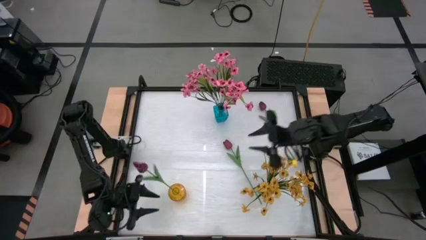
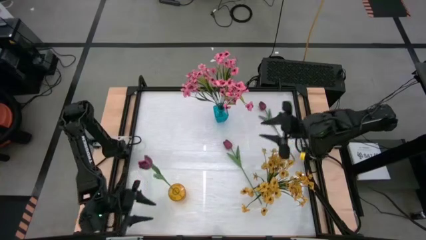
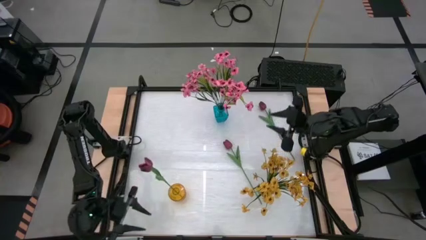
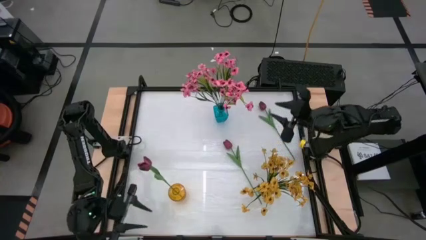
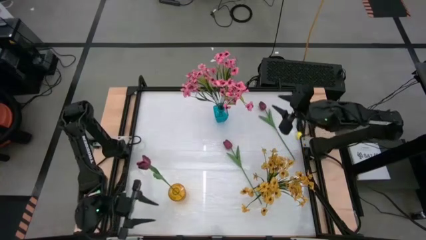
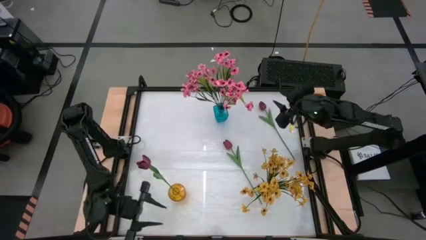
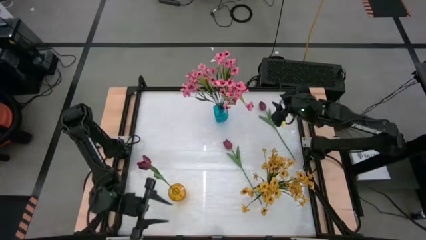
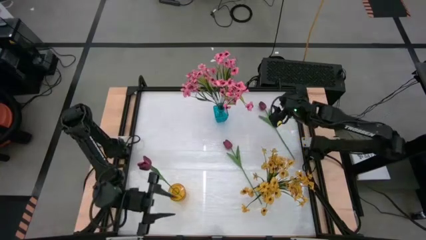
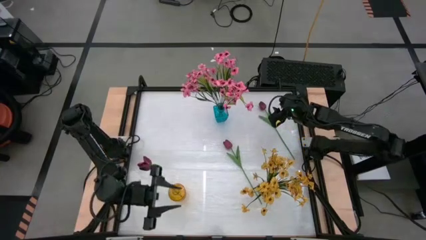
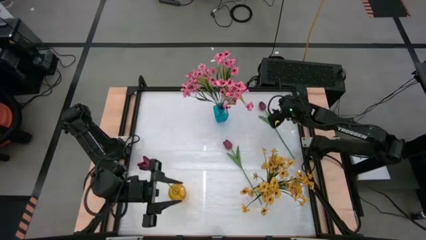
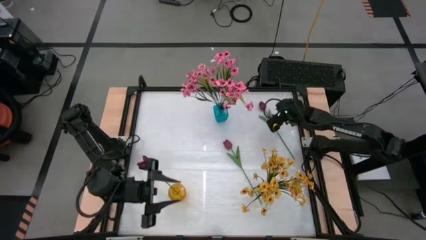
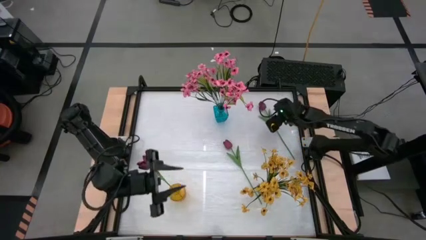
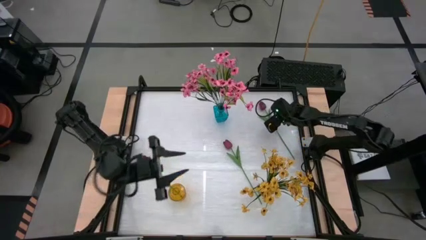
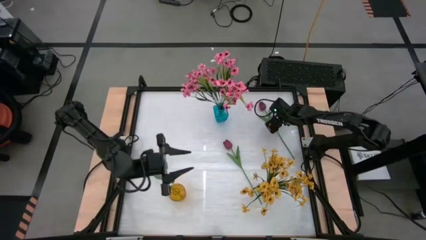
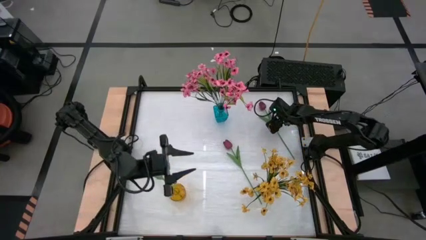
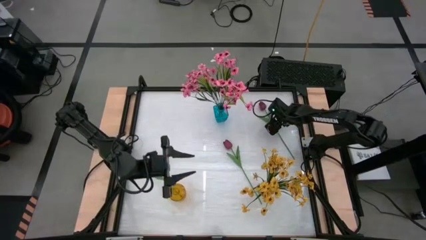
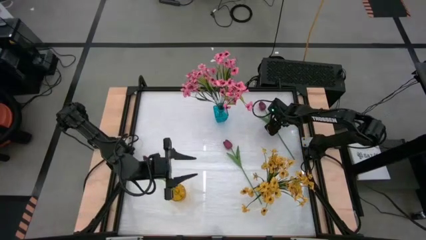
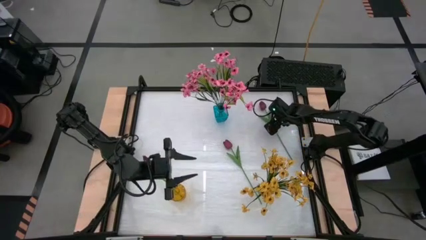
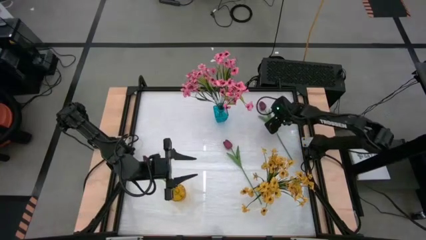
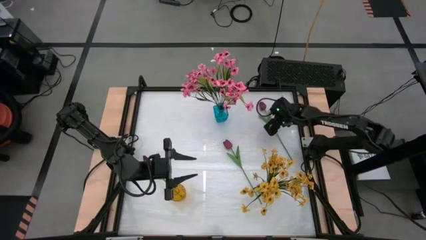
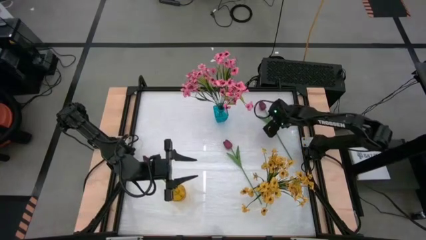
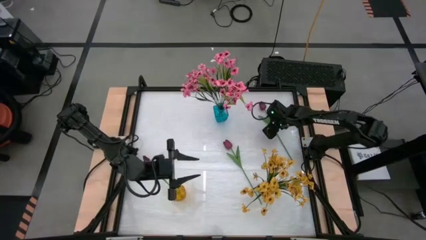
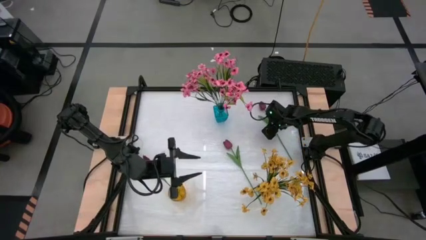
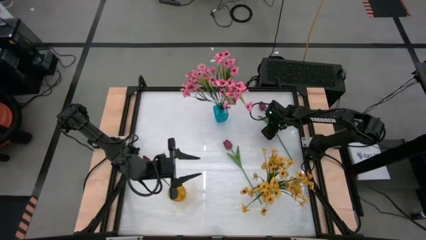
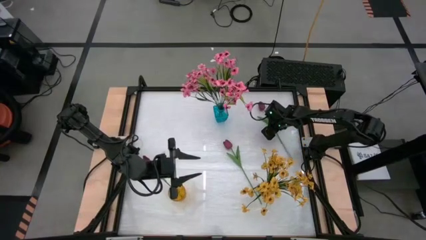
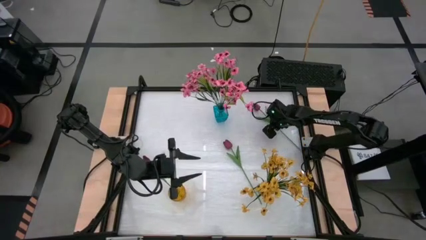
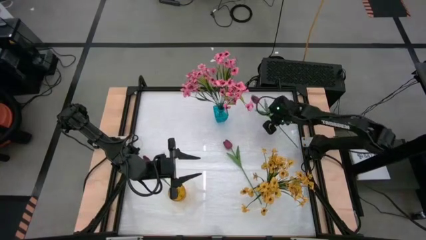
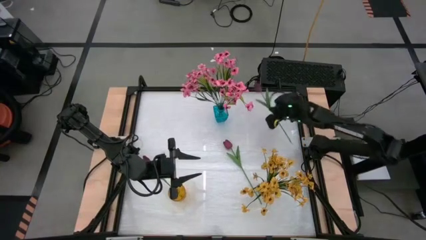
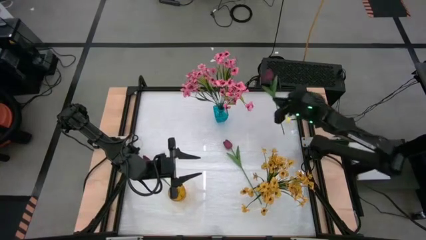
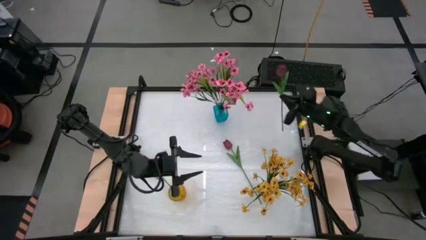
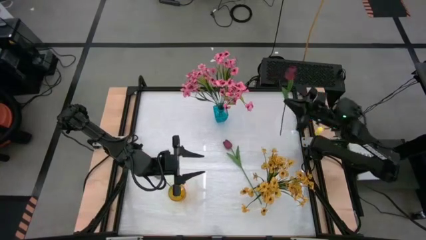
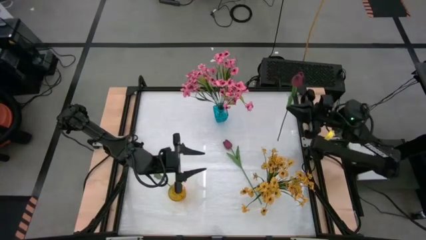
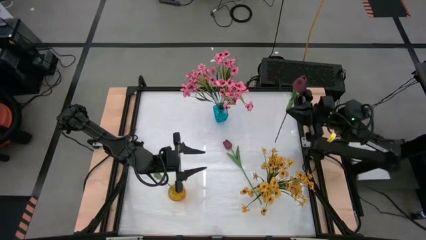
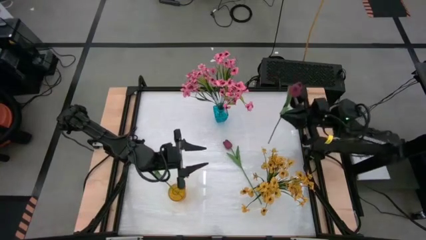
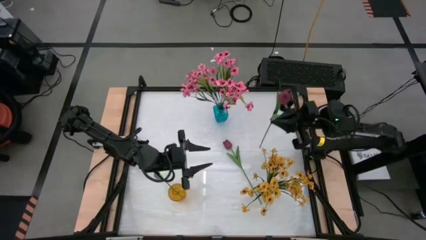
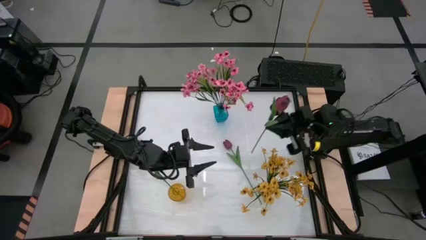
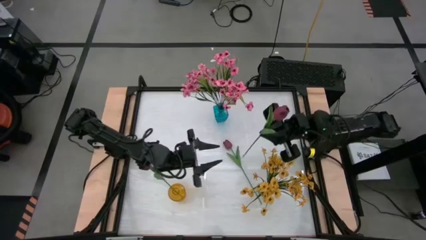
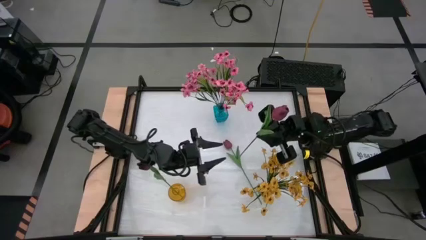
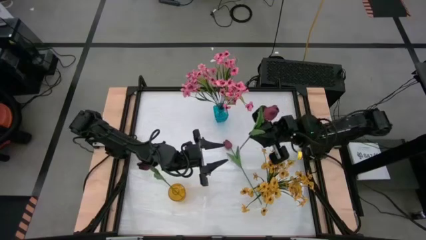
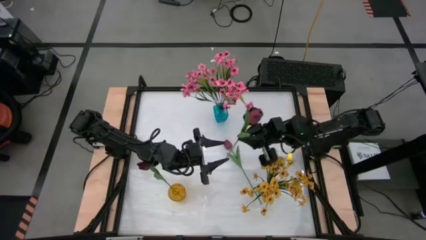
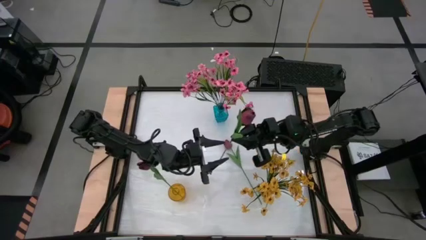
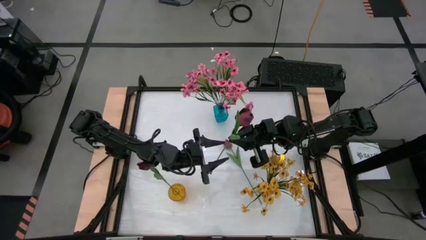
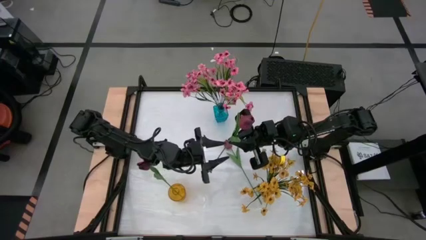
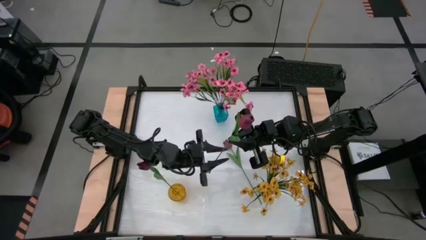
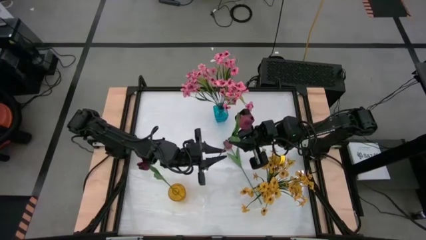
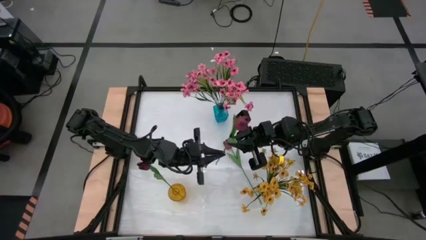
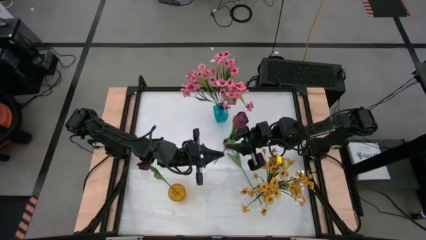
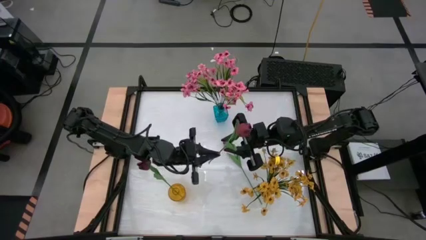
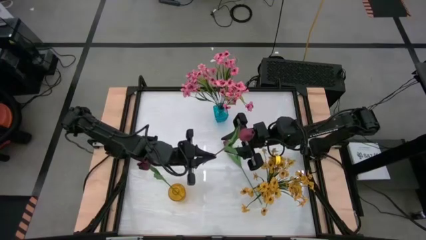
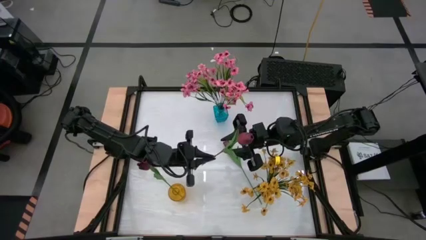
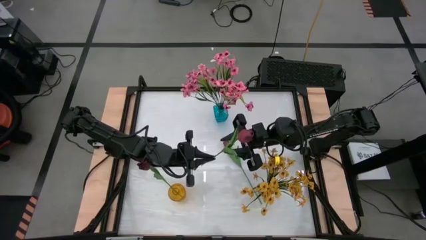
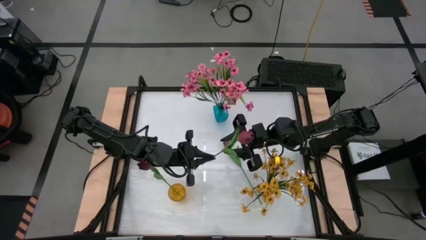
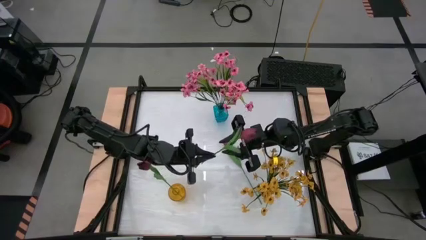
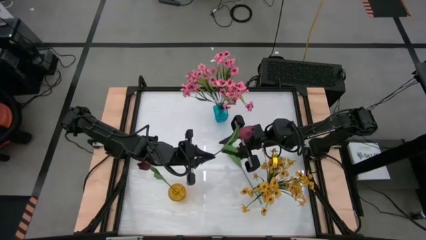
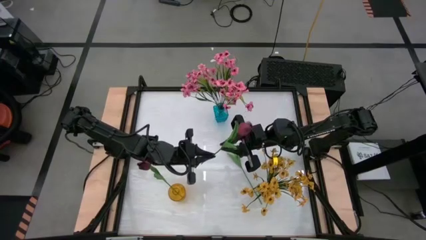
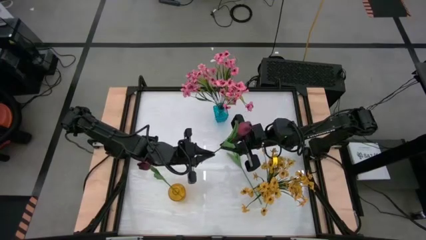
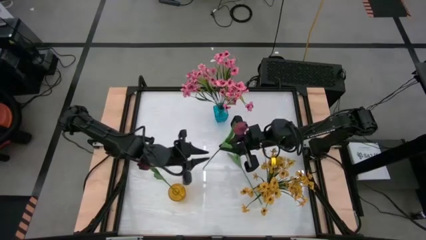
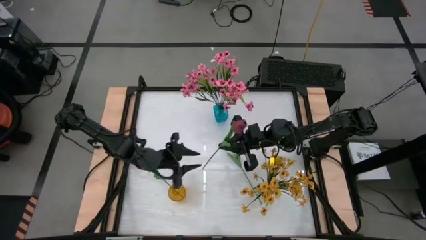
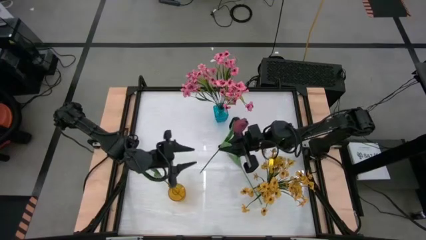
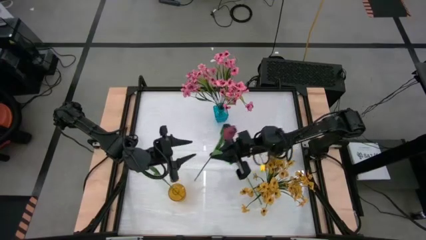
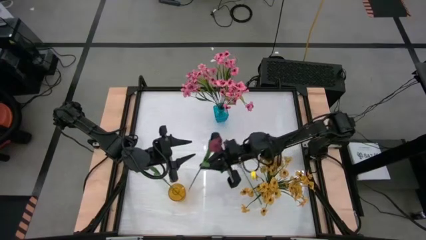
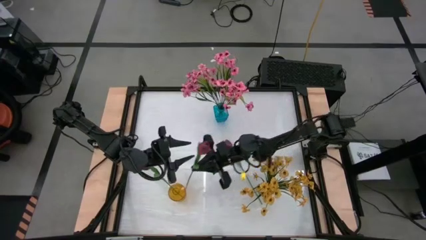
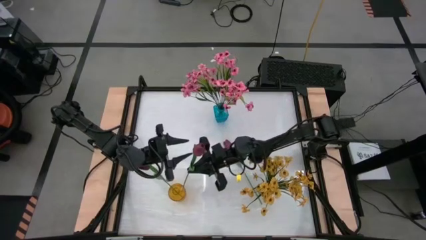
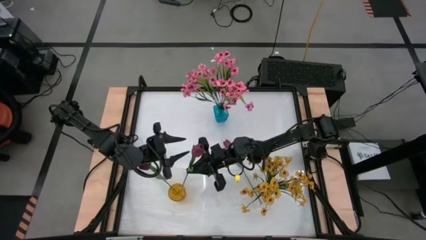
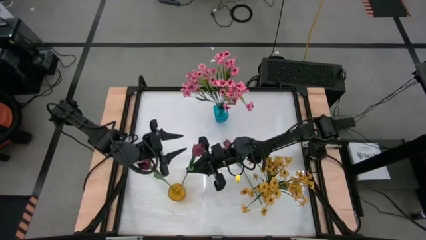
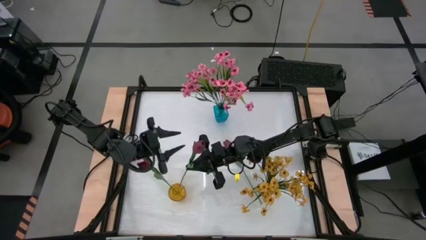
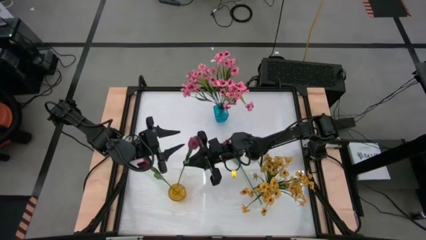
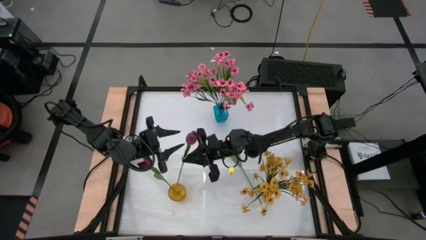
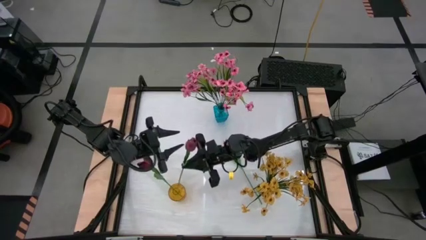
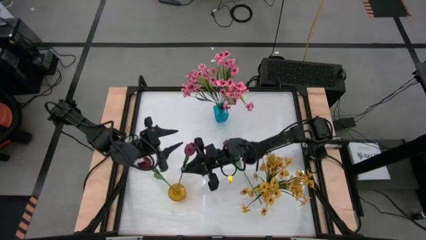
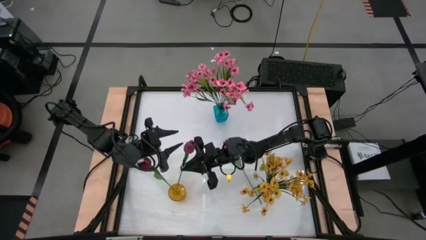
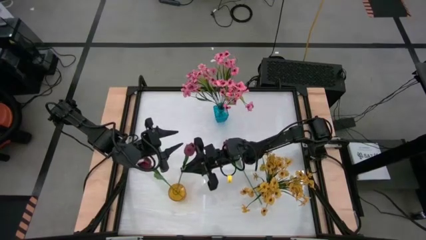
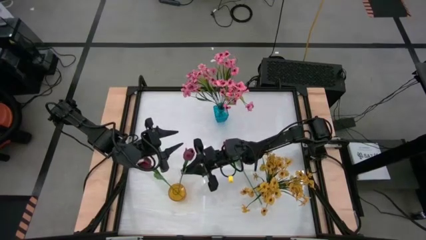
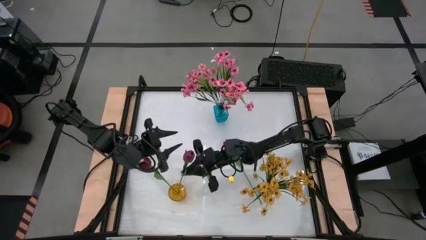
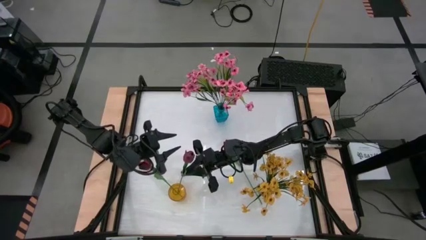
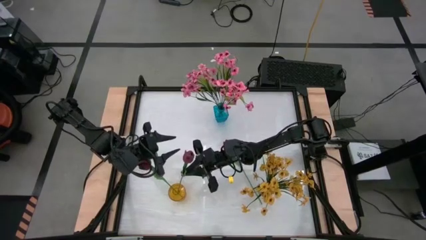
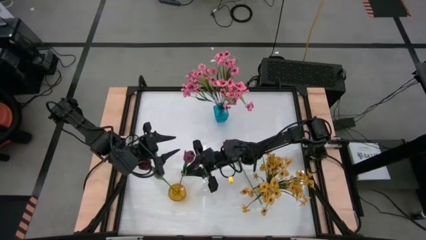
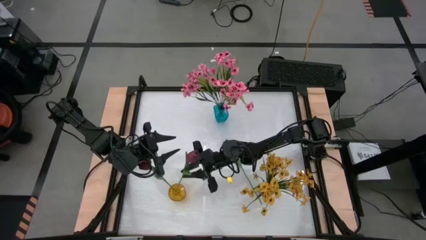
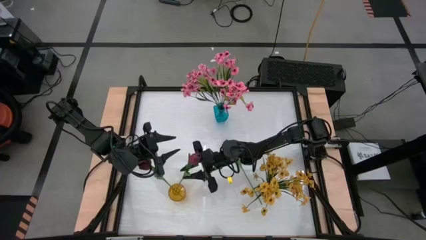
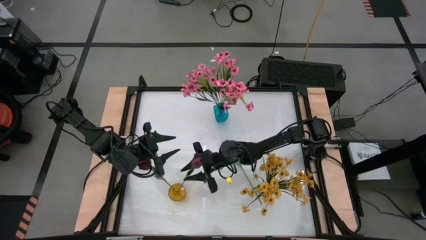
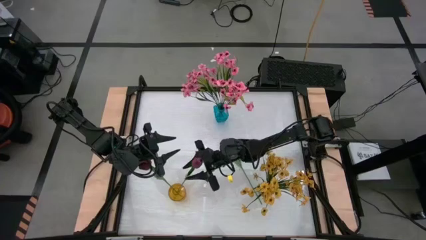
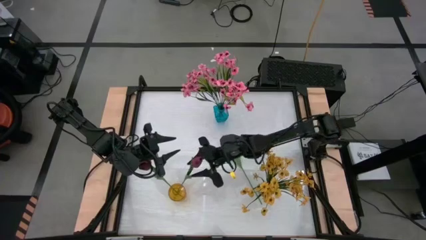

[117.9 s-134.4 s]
Task: Sort flowers into vase by color
Put the top dark red tulip into the yellow vase

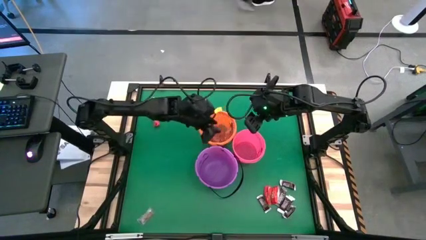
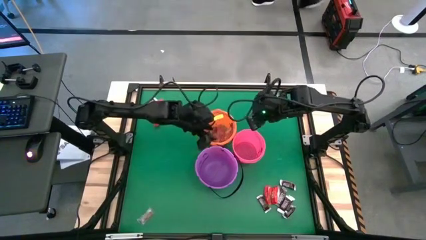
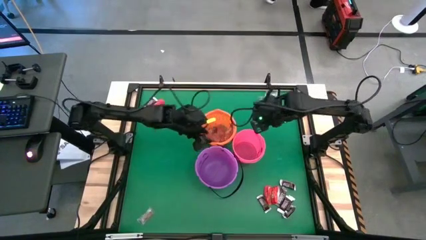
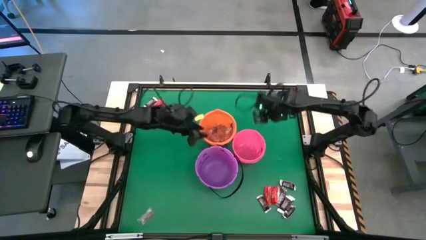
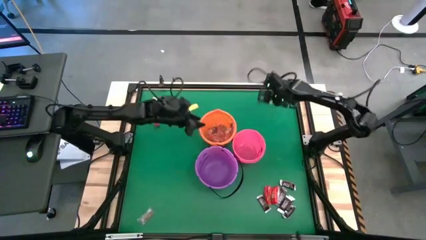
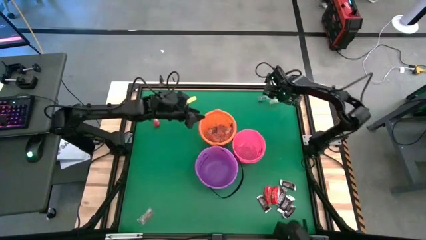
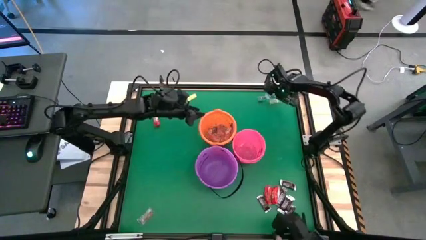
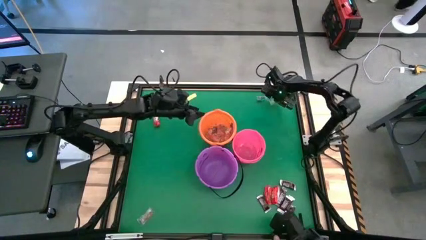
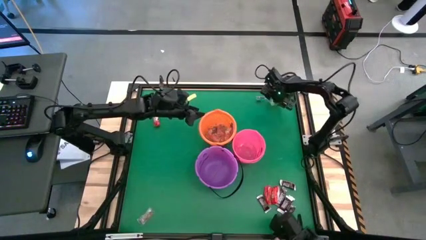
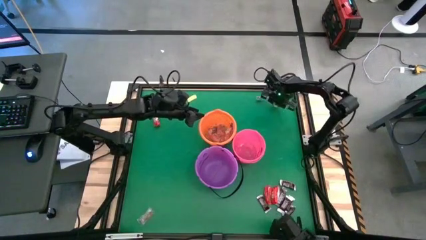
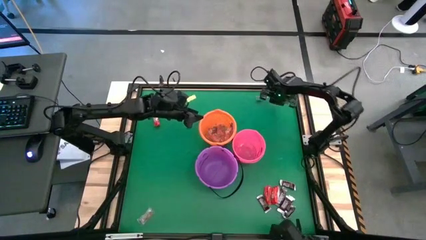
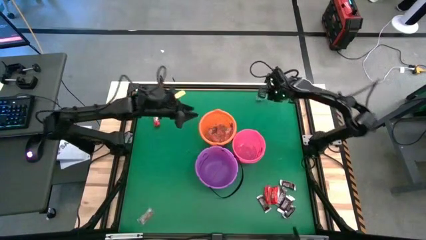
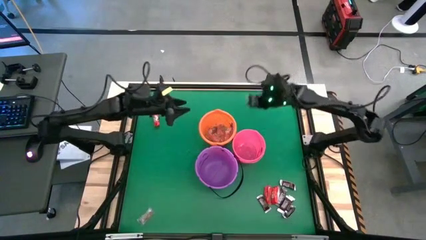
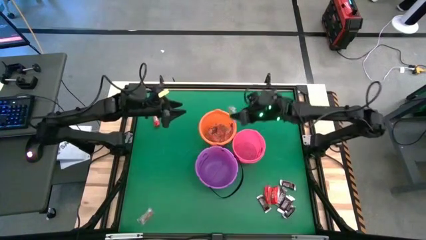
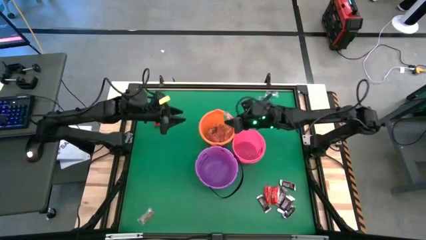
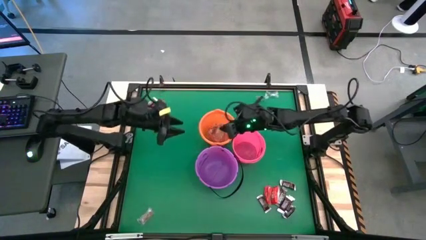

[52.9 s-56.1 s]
Task: Sort candy by brand, put in halloween buckets
Put the green gummy into the orange bucket
